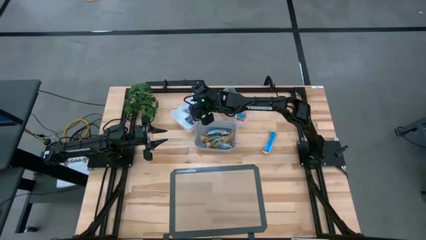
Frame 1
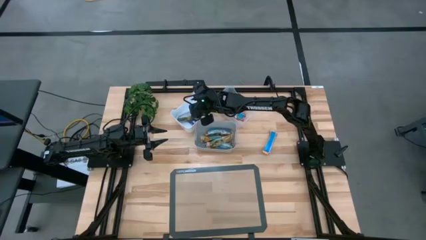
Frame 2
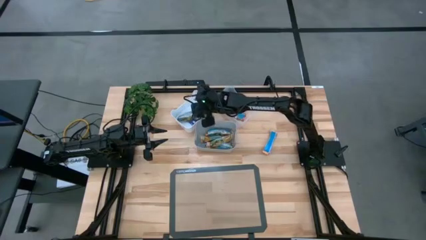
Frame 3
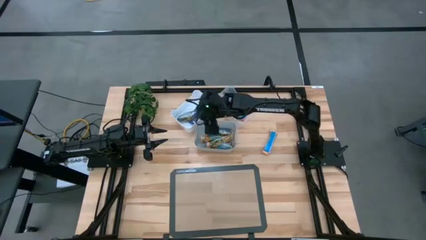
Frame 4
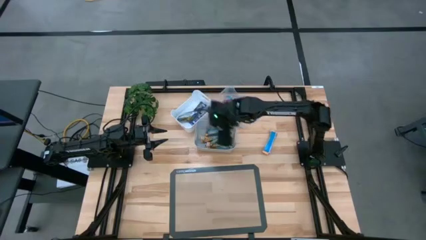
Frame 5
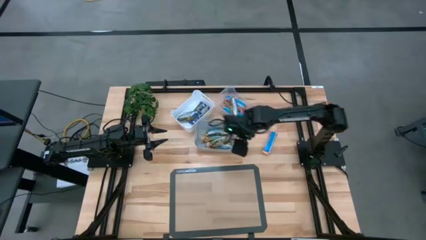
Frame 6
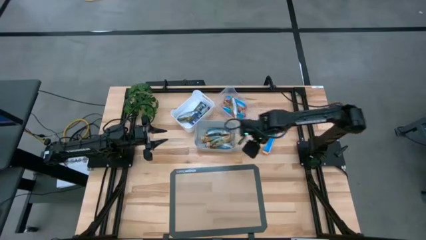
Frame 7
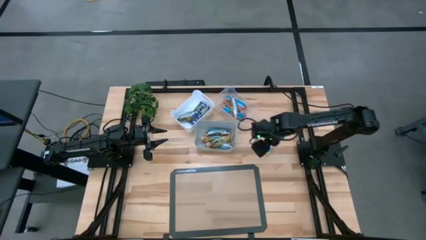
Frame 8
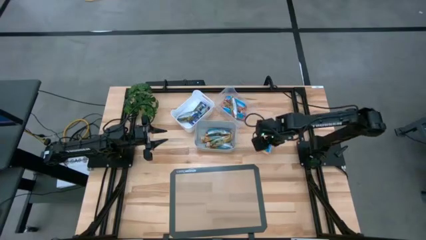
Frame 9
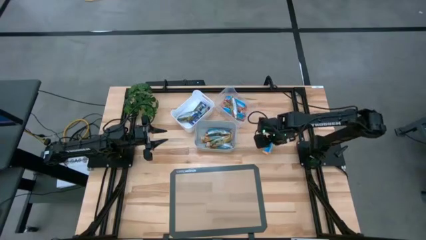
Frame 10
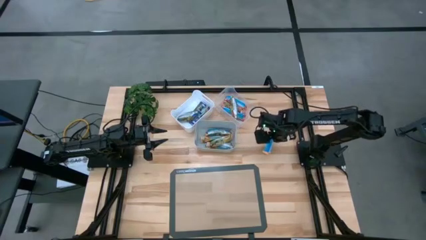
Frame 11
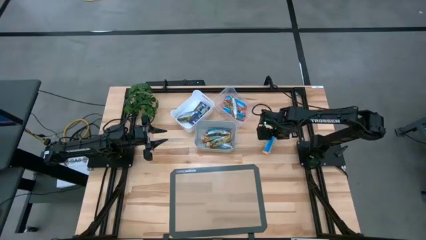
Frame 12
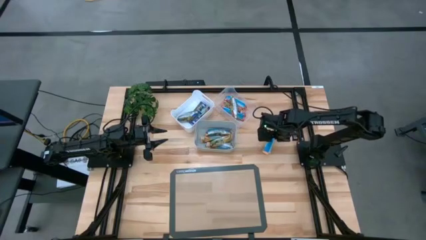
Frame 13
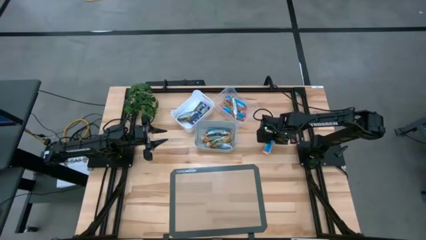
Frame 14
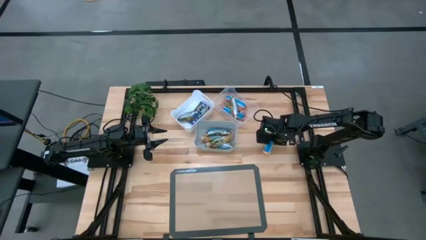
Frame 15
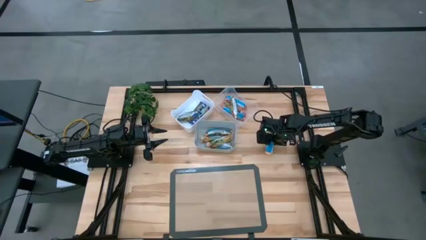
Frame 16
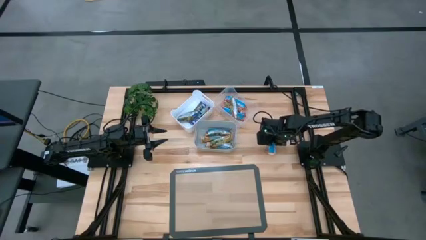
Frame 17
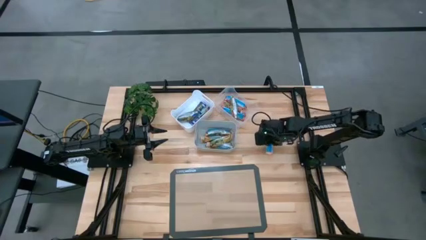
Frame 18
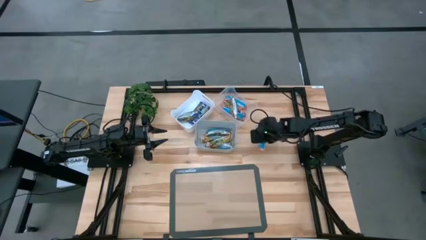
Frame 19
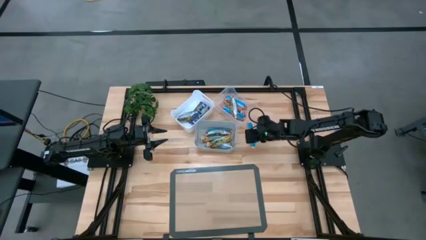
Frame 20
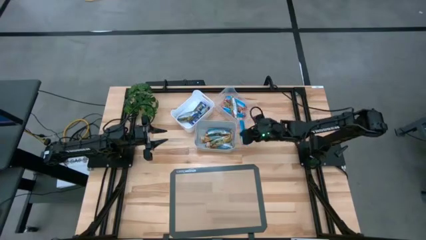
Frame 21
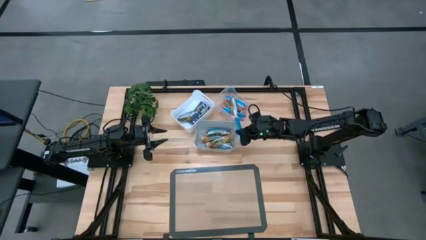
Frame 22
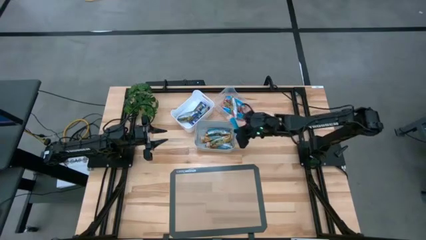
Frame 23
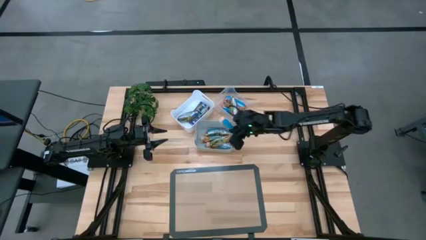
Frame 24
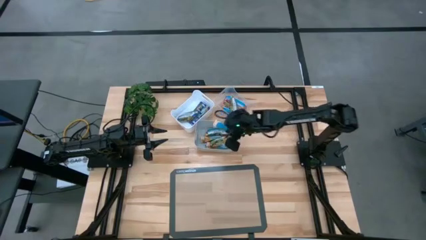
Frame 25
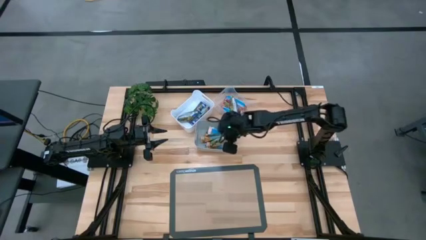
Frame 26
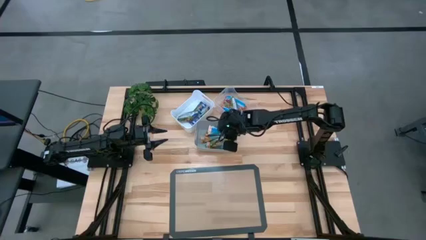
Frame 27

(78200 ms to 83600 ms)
Task: Pick and place Granola Bars by type
Put the yellow granola bar into the gray bin

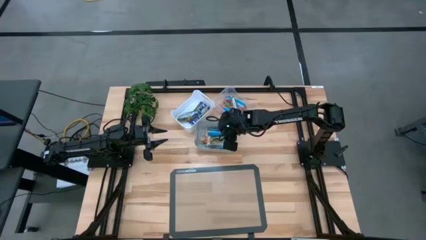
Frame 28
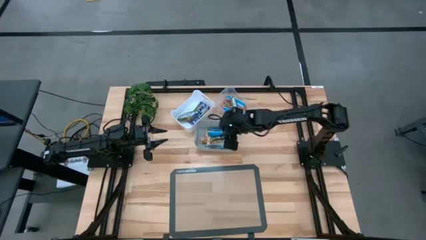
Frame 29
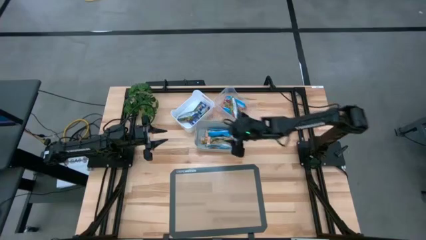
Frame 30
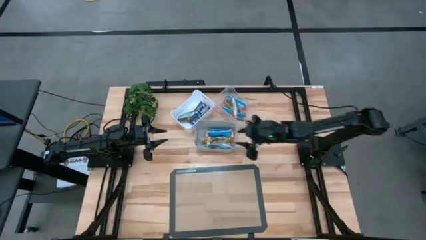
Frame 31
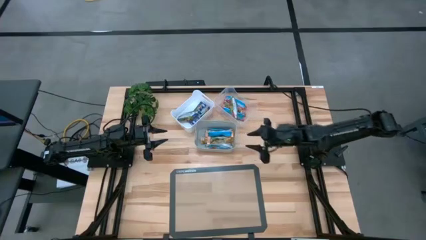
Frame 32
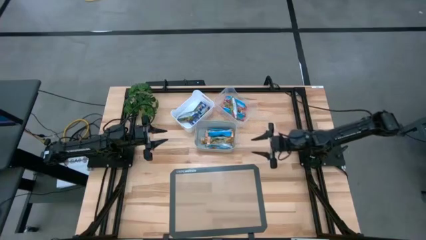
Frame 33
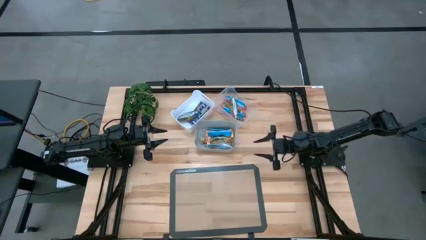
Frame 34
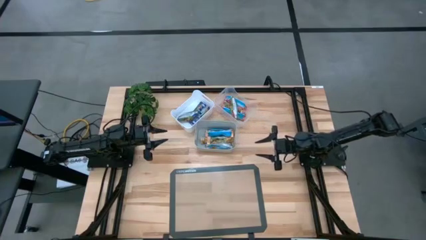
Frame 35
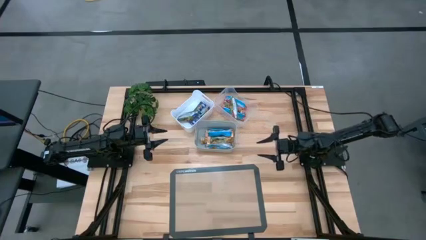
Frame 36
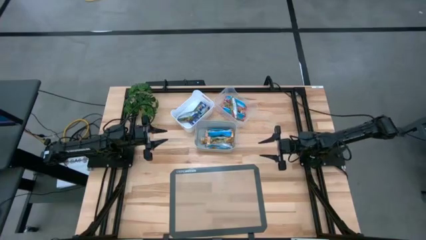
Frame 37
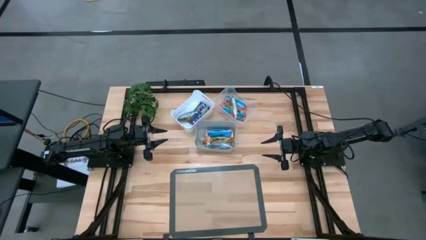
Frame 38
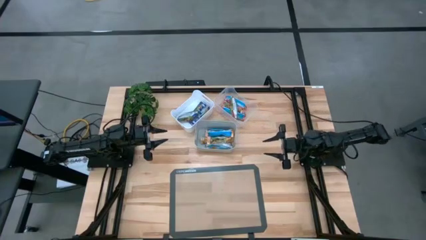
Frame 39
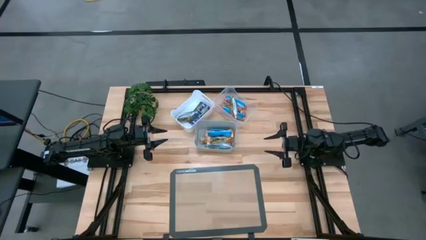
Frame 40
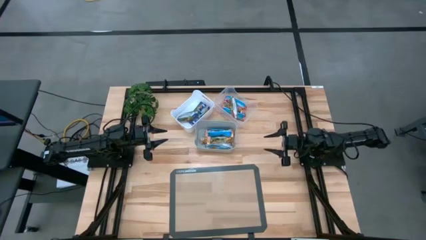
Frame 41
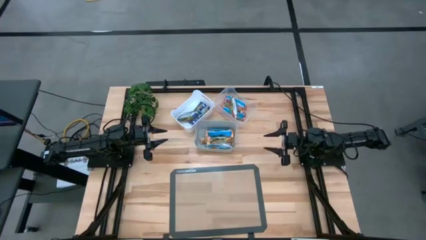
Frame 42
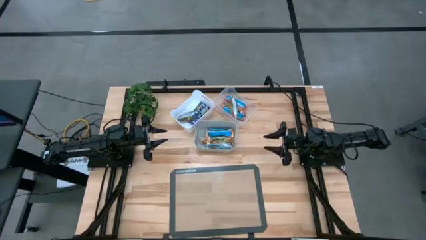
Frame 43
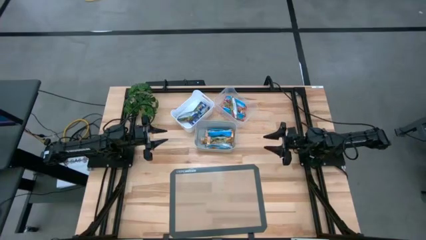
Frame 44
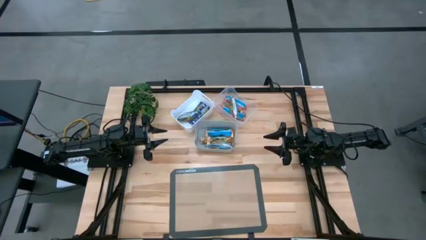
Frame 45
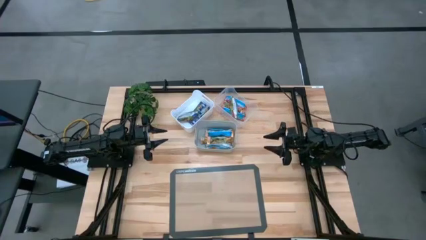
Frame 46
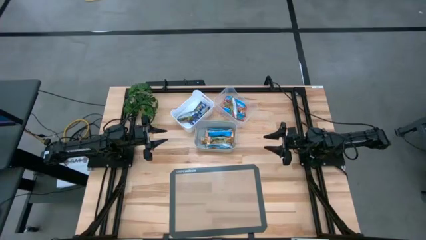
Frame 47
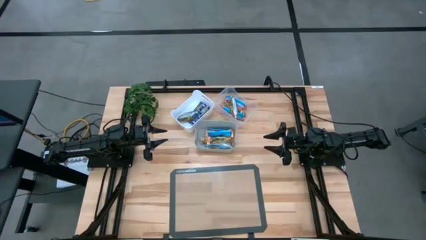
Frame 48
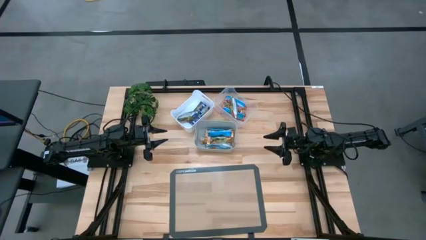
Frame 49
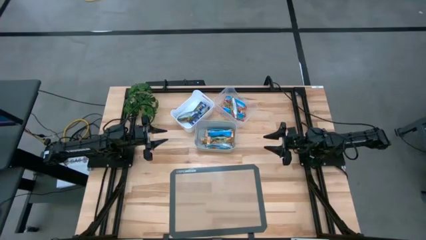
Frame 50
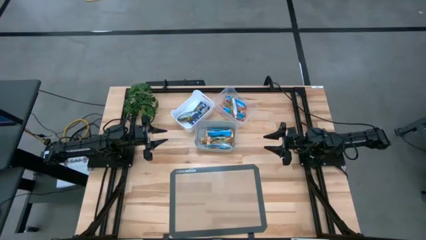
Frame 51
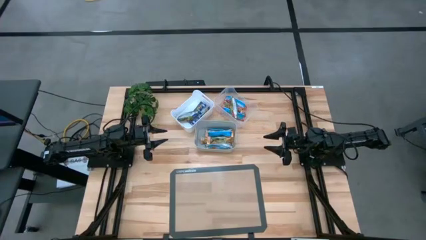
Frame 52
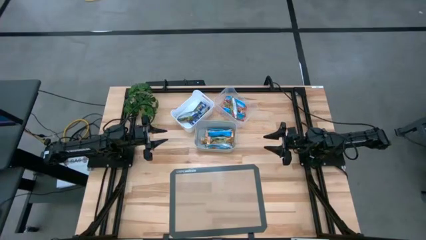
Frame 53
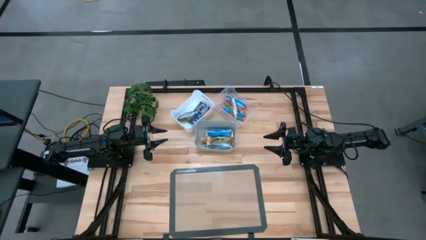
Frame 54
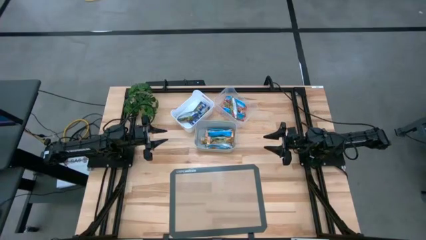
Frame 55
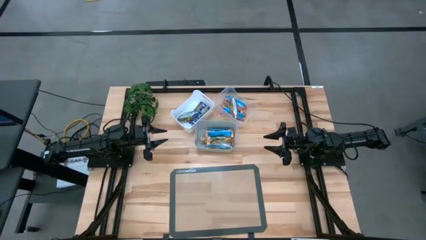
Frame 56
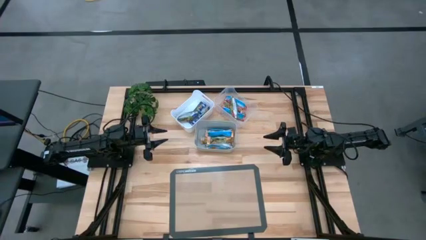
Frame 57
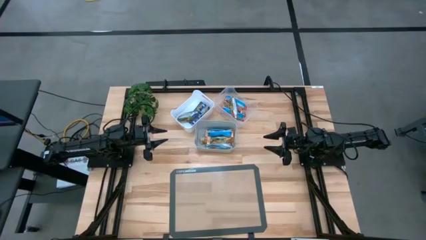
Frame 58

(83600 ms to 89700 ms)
Return to Home Position

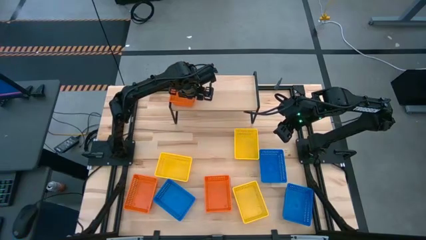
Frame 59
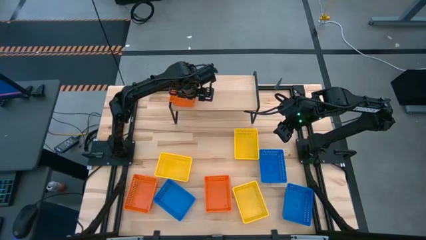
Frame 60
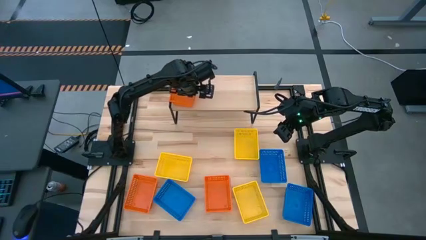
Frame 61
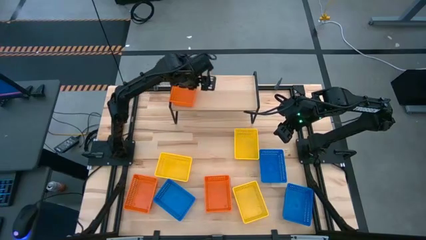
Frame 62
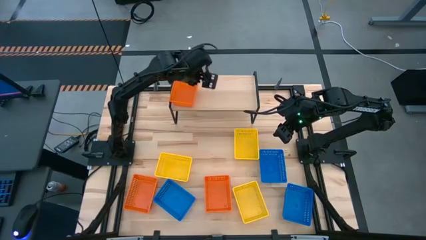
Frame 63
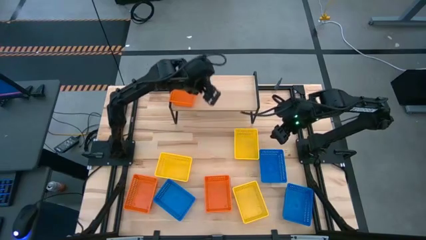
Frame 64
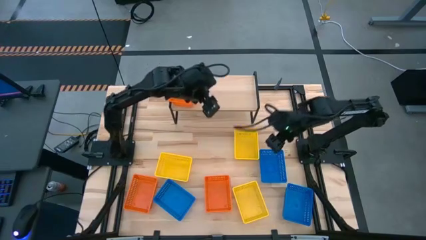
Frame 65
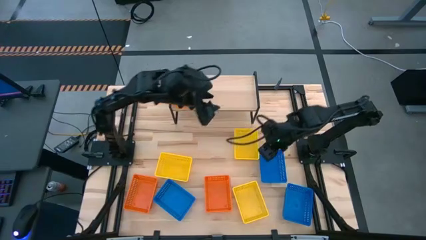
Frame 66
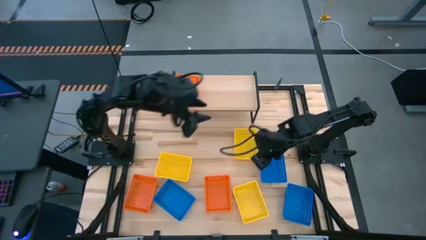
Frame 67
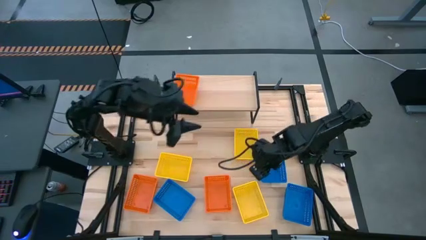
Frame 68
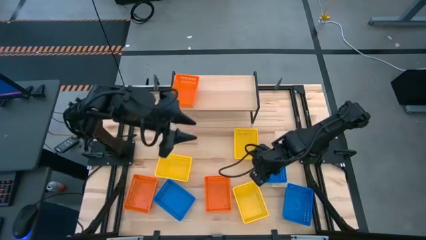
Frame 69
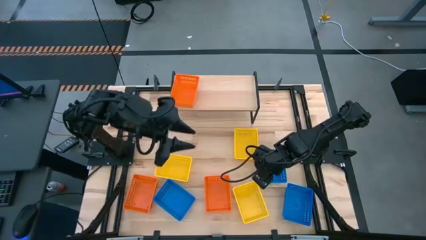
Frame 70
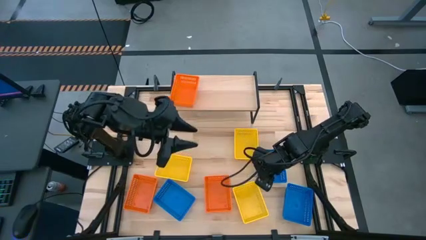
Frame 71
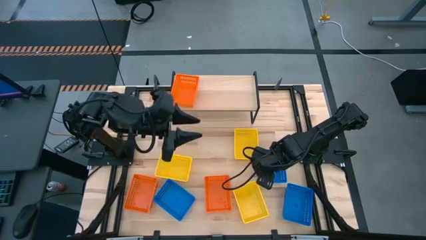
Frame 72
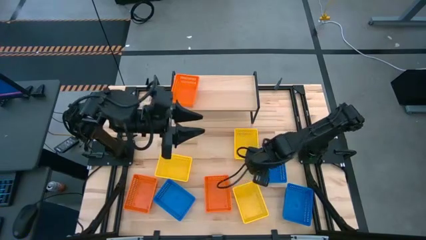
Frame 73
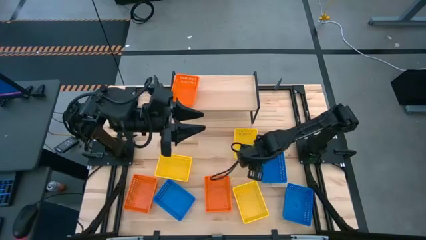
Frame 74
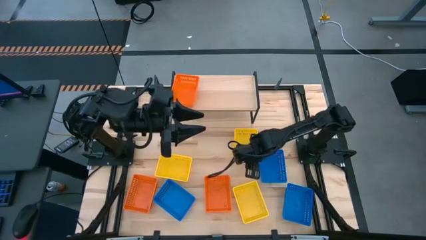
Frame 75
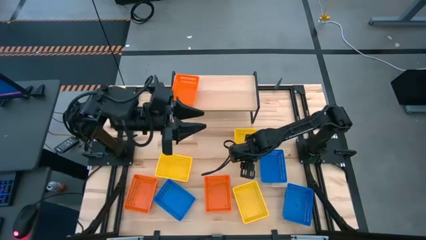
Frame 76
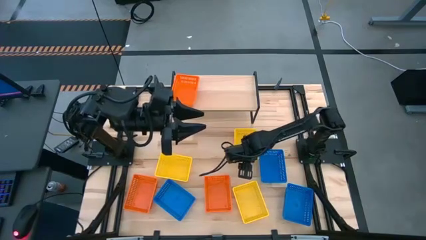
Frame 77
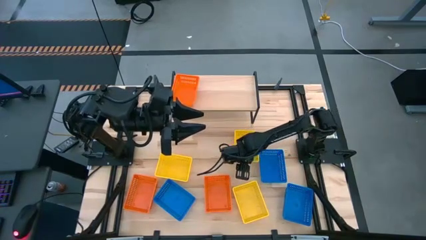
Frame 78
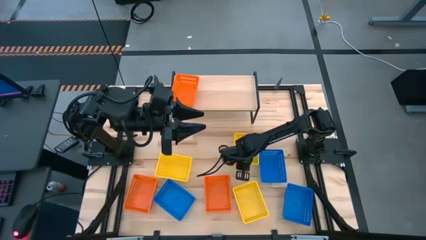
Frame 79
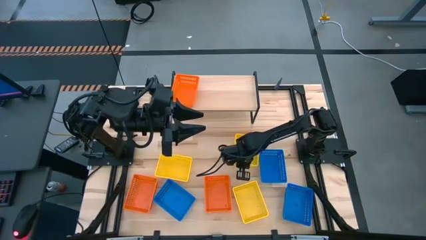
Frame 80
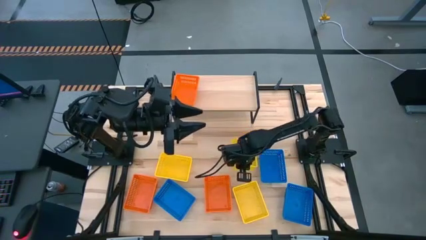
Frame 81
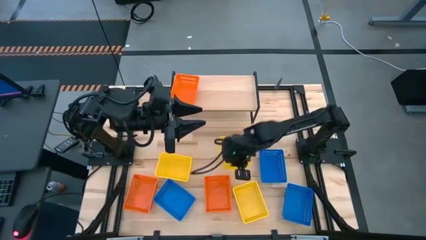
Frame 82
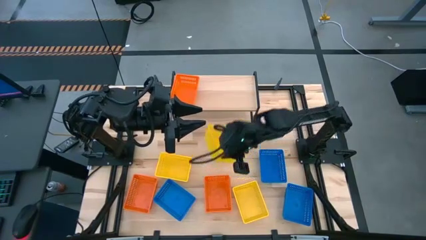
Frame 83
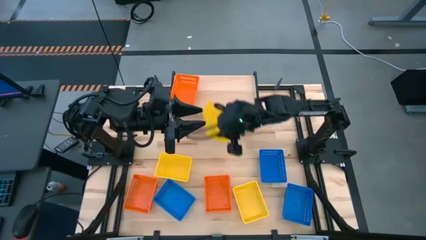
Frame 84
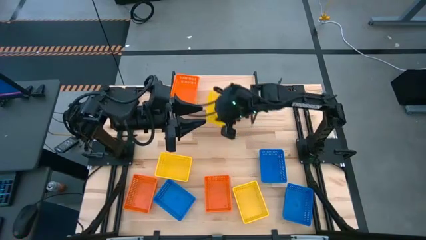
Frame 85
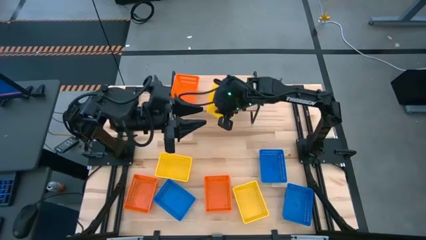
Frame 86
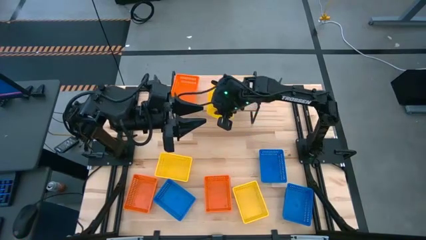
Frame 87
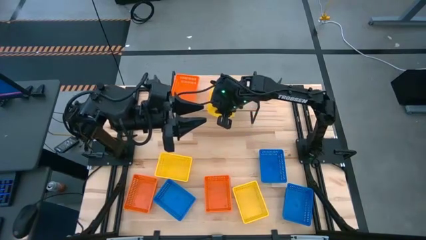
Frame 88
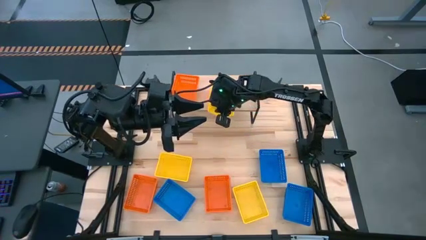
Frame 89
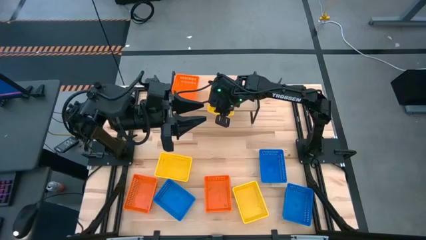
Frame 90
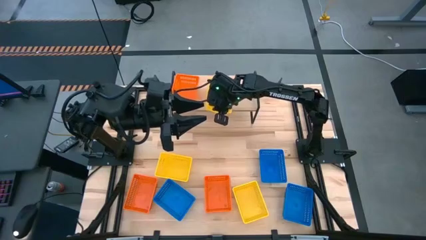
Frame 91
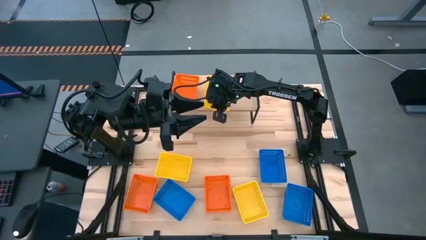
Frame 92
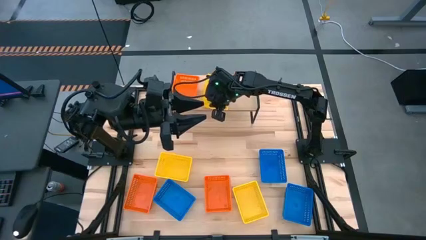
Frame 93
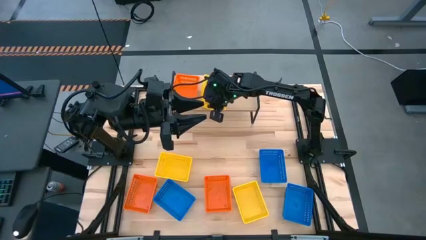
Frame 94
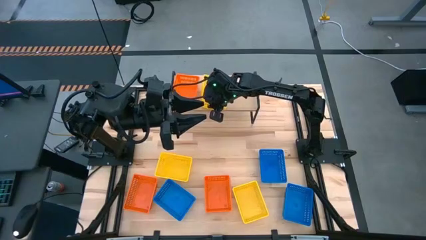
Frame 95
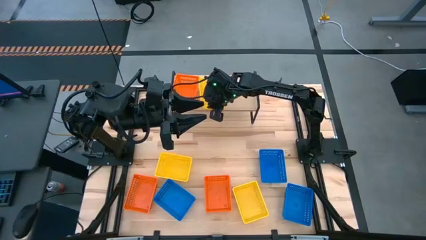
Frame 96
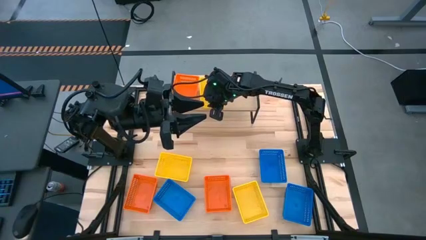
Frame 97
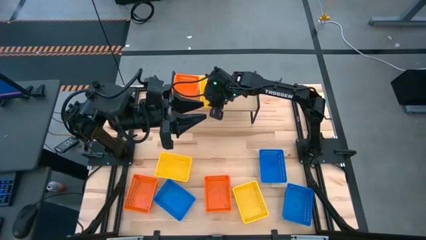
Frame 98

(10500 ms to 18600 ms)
Task: Stack baskets on shelf by color
Put the top yellow bin on the shelf
